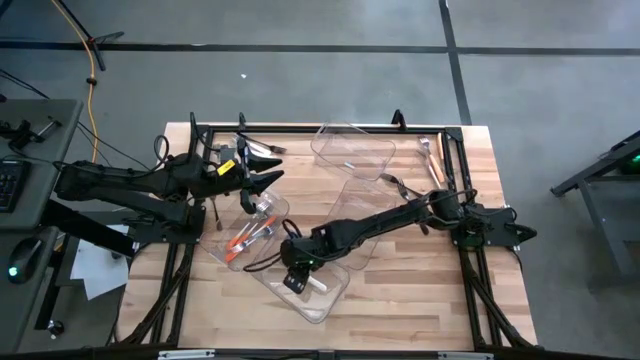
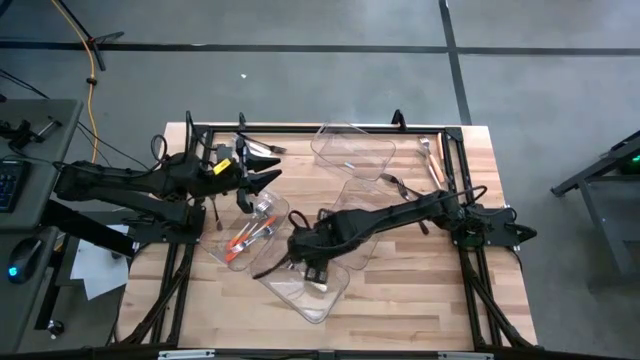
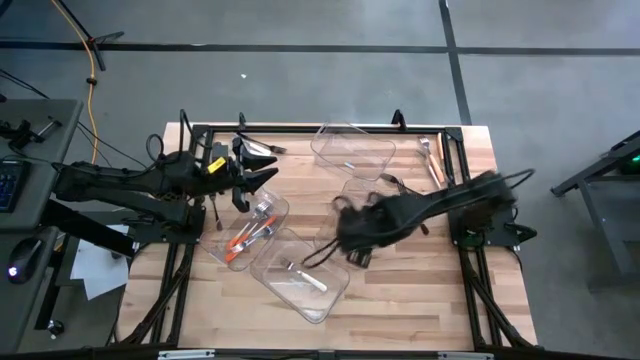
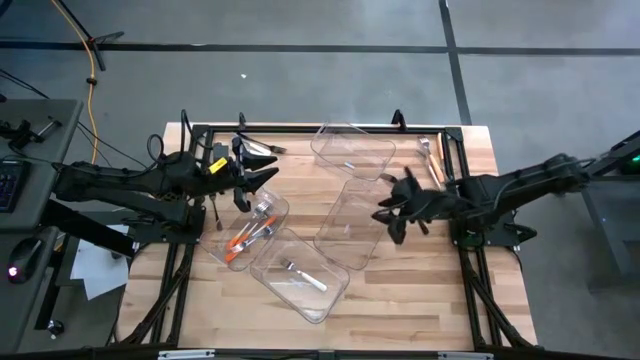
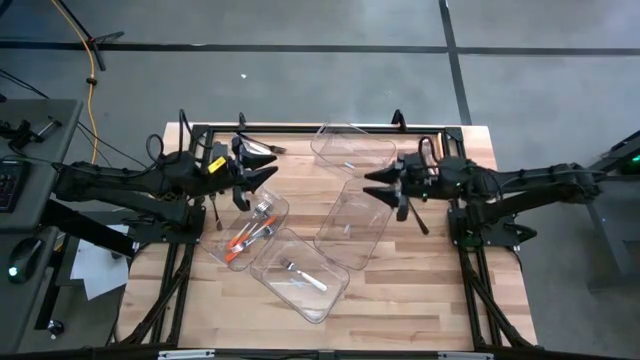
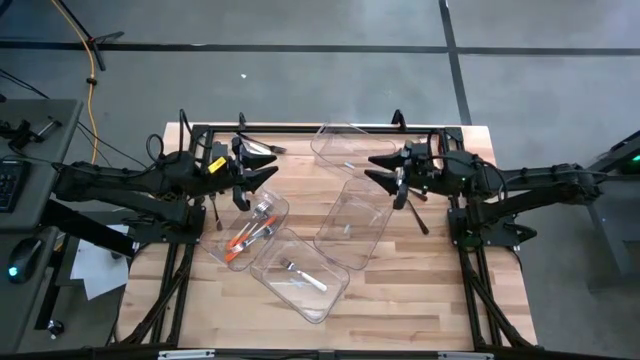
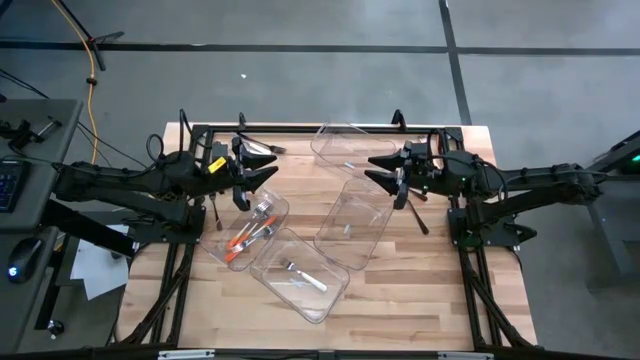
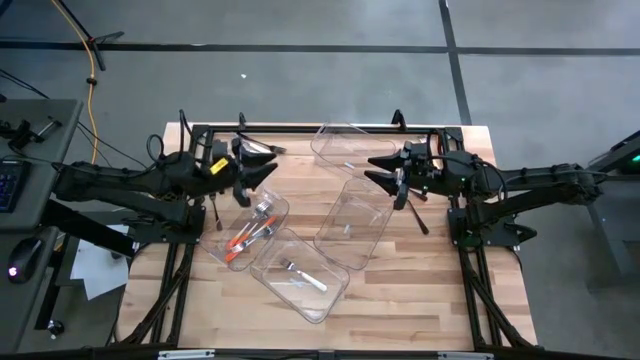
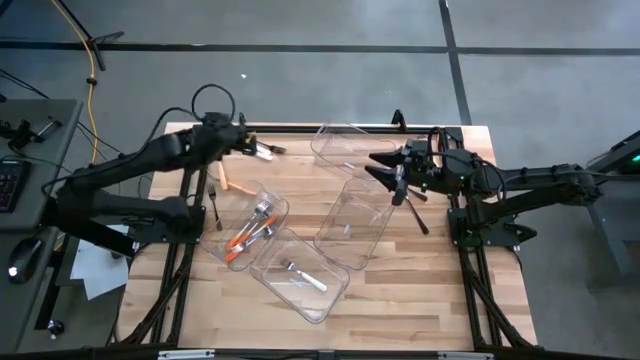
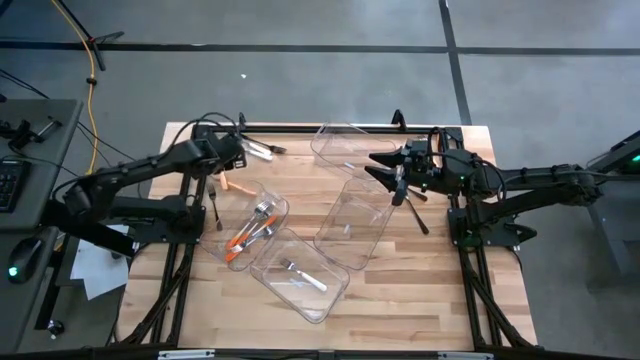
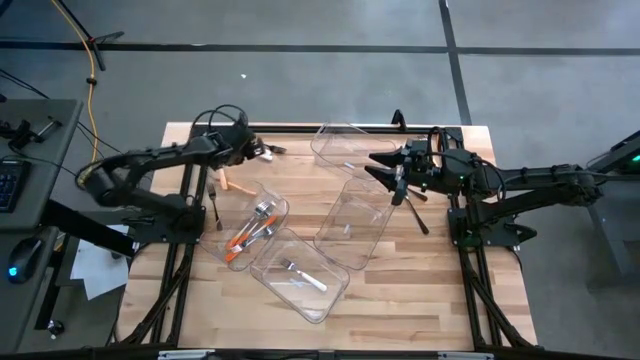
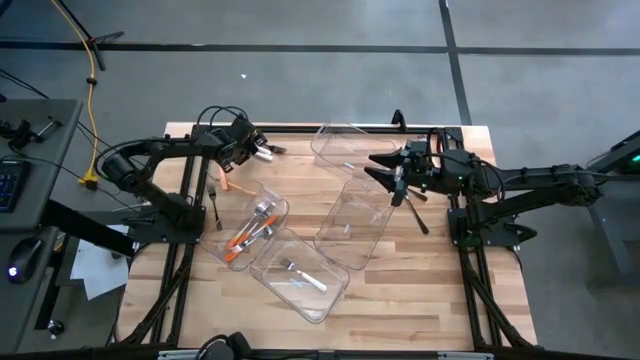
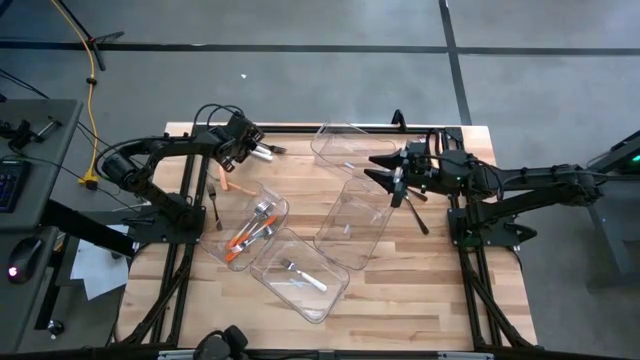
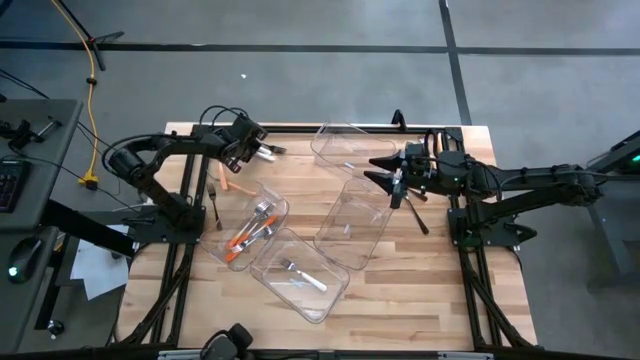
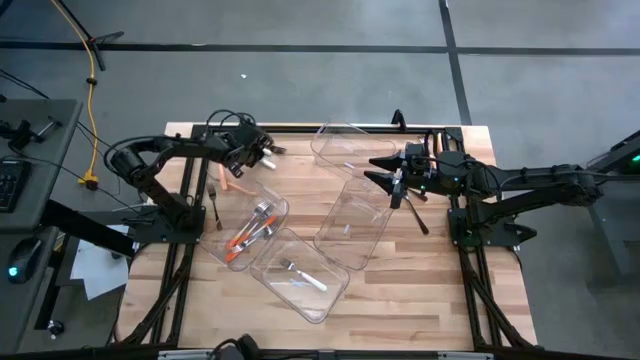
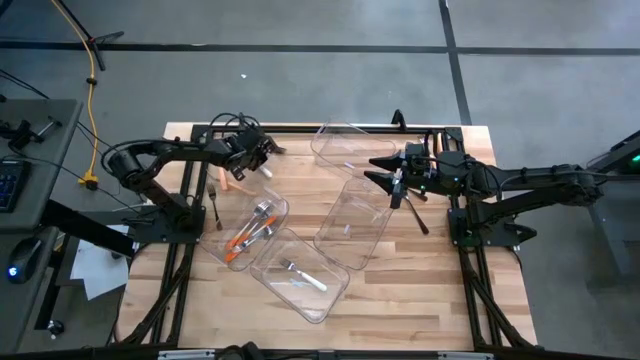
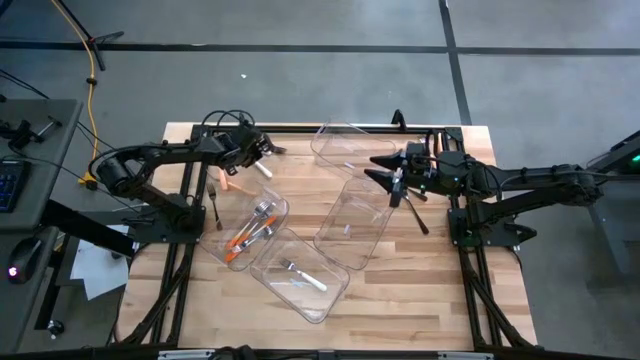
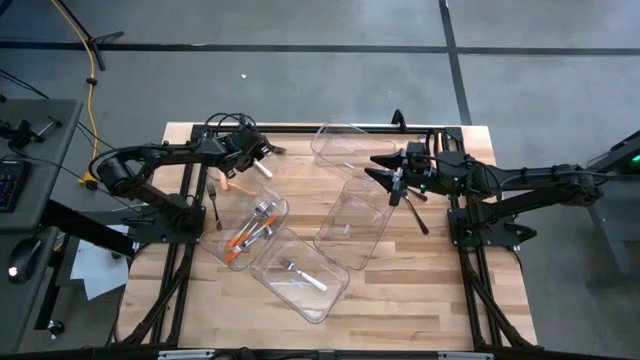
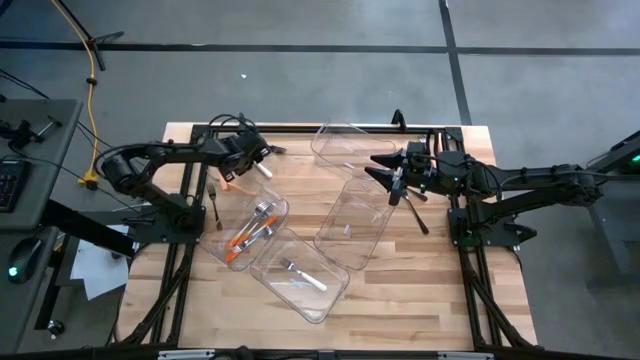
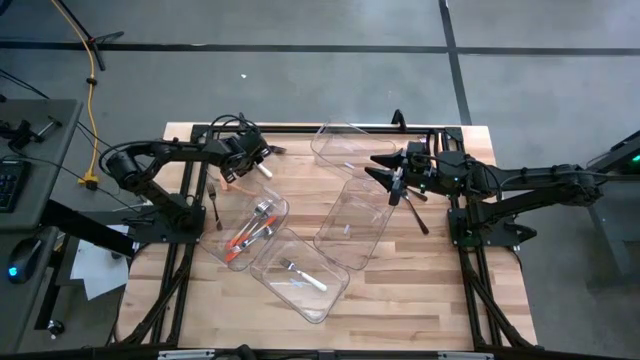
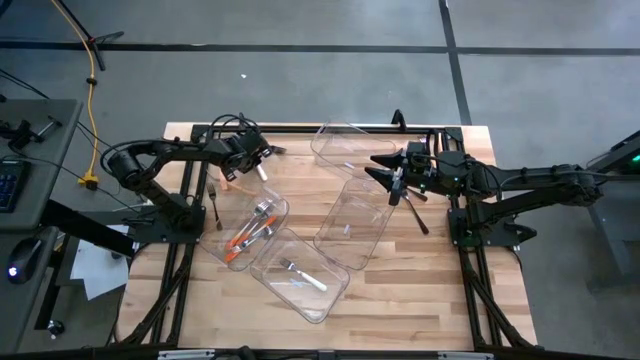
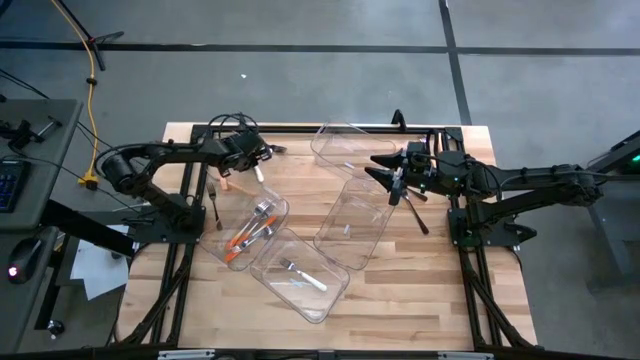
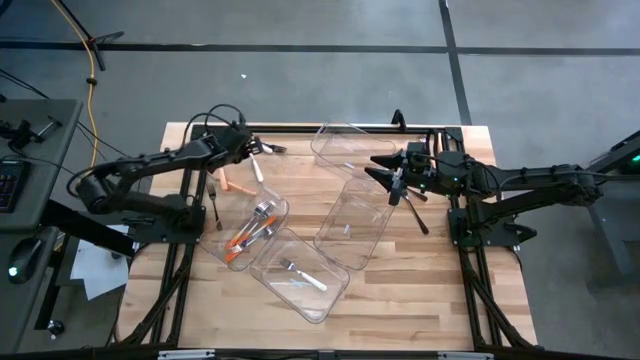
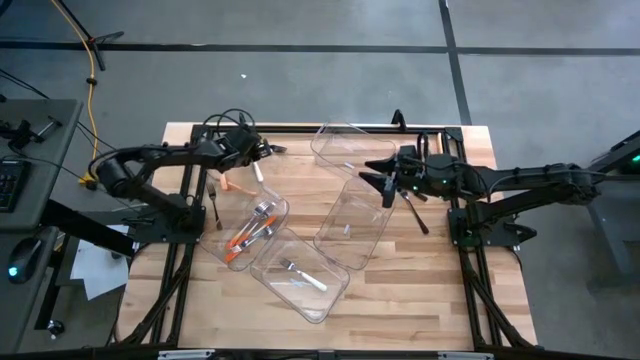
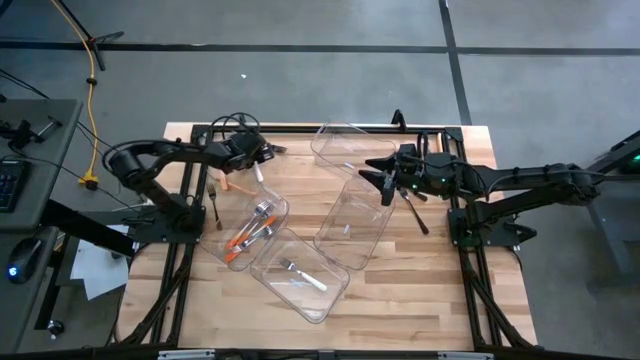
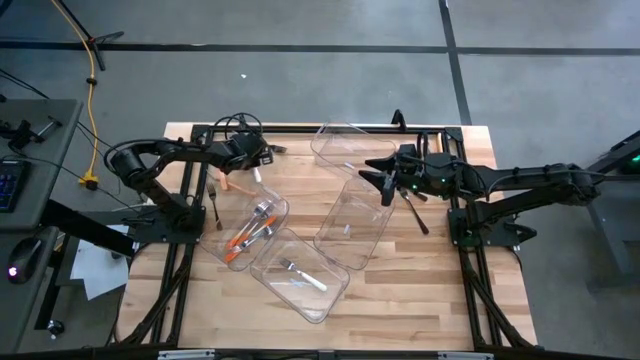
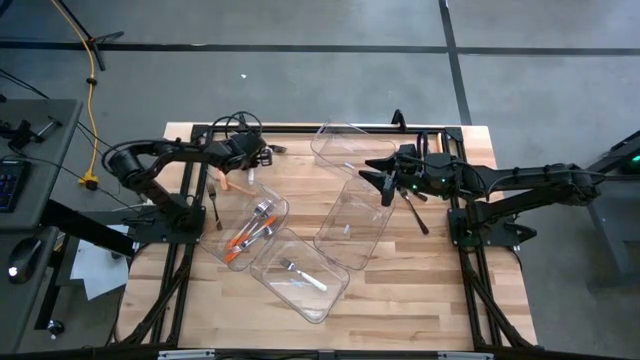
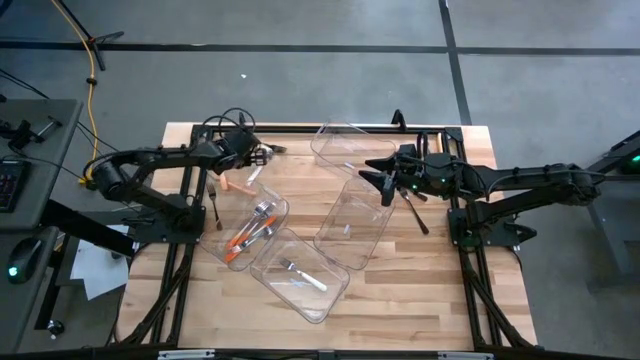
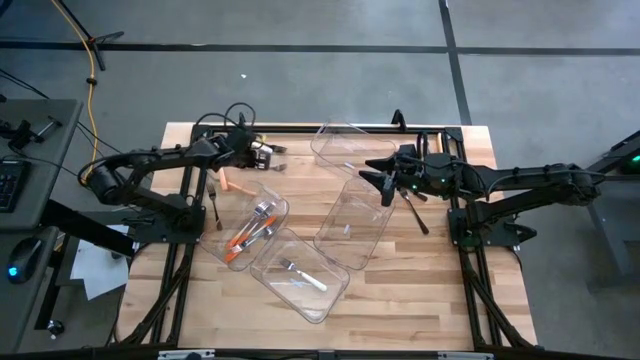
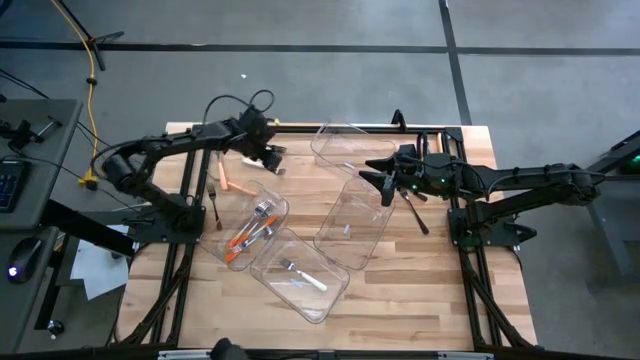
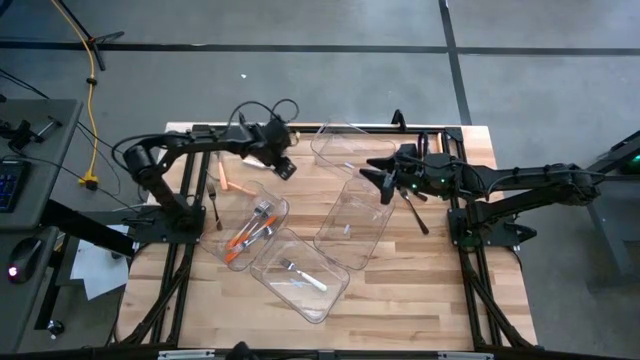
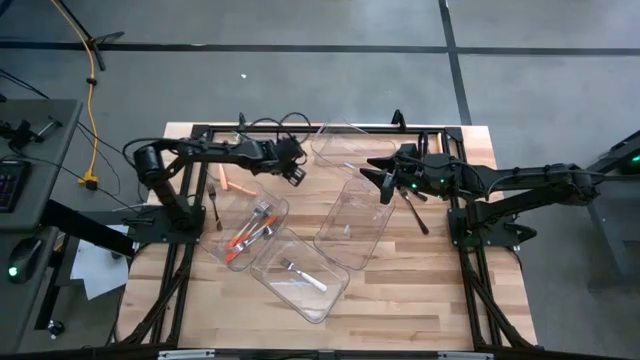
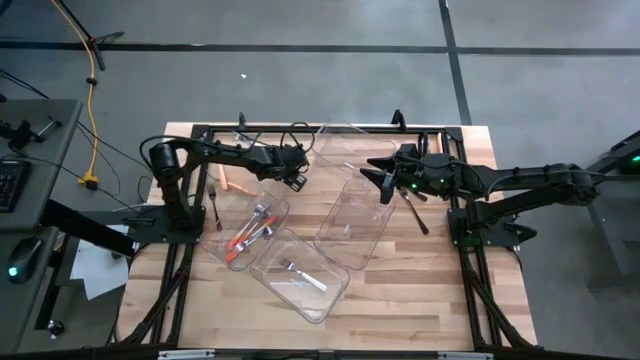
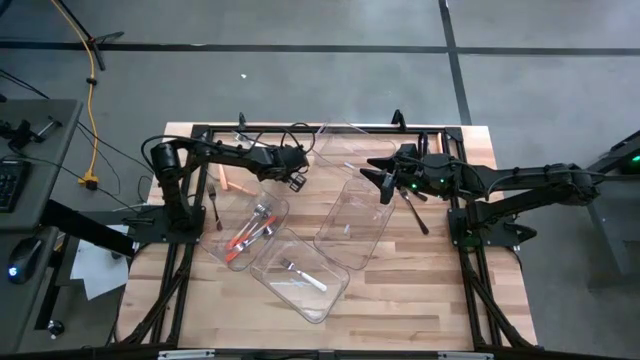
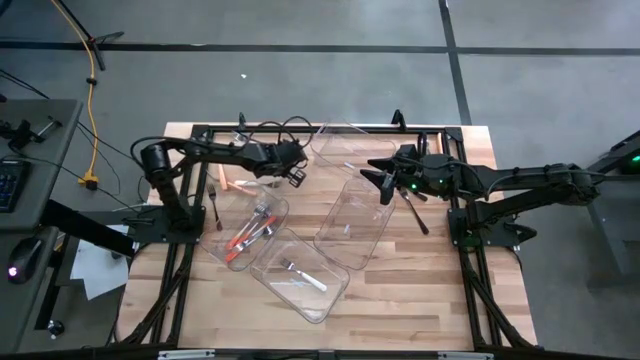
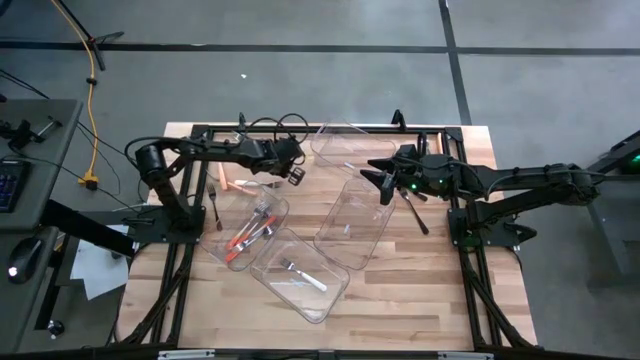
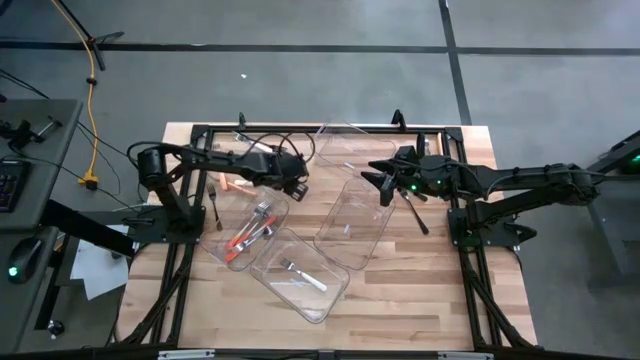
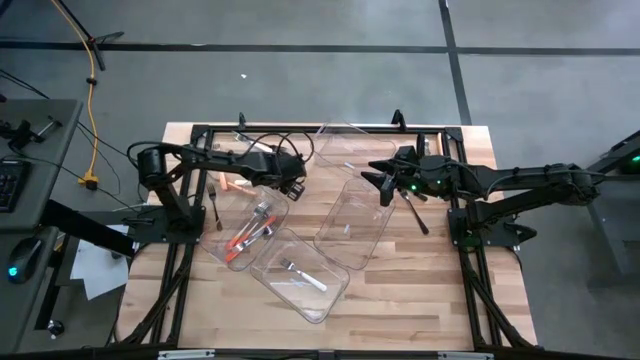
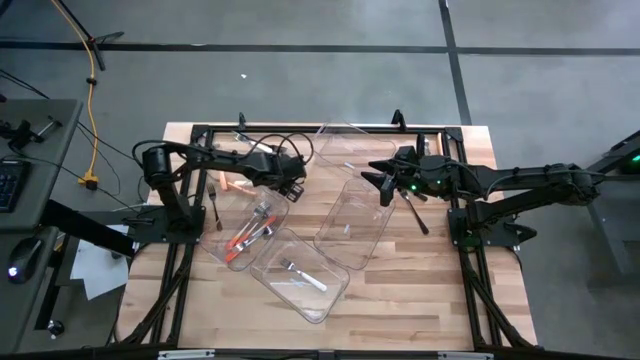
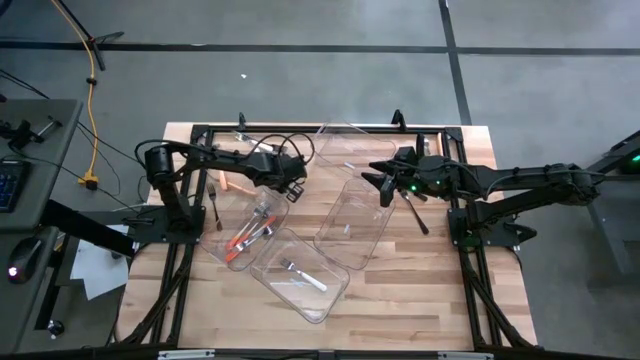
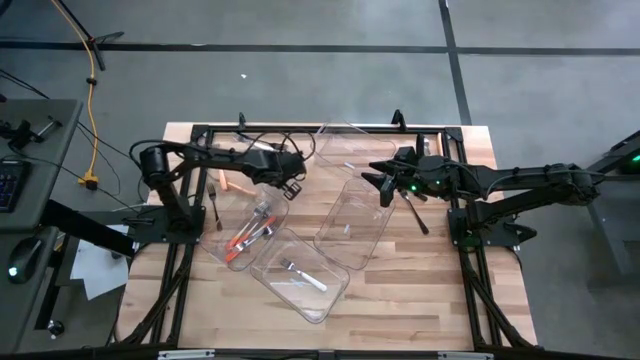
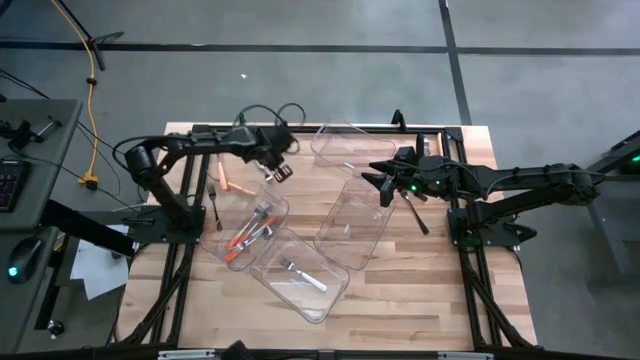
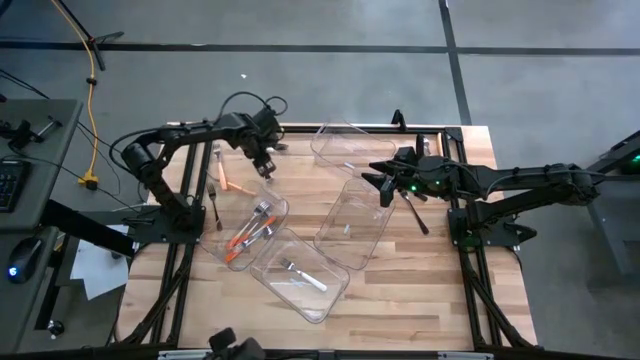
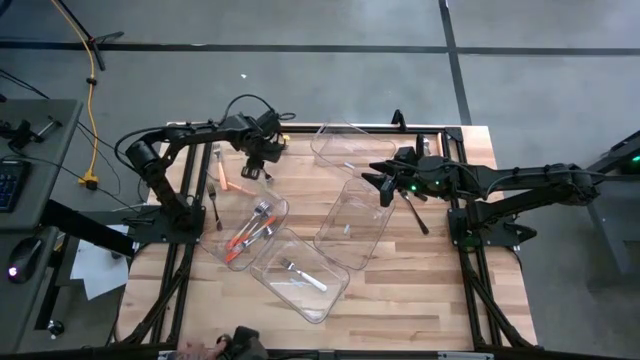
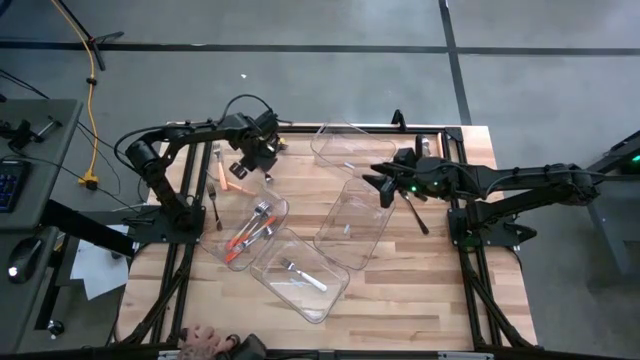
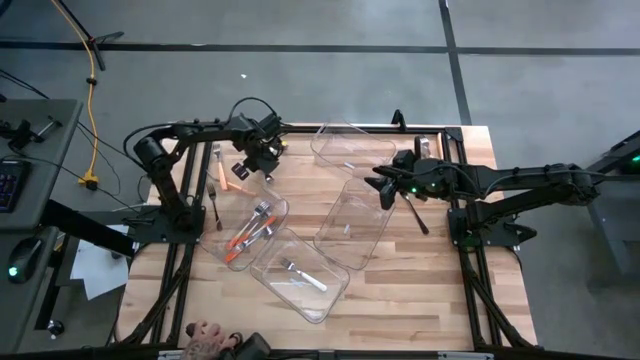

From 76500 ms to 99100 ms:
Task: Sort silverware by color (type)
Put the white fork into the bottom transparent bin
